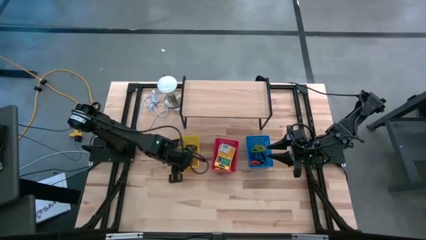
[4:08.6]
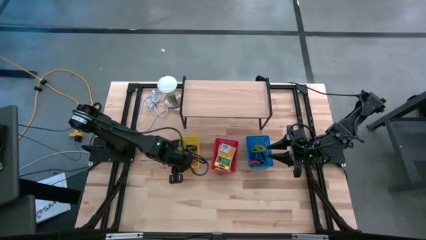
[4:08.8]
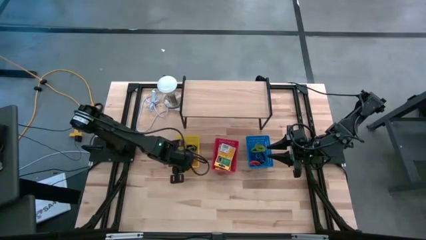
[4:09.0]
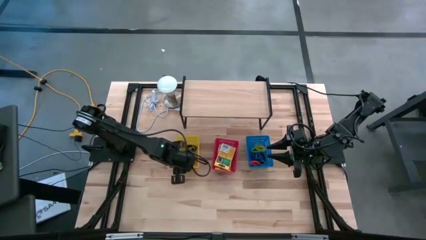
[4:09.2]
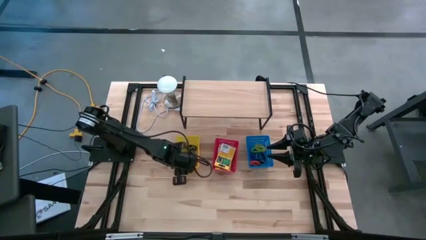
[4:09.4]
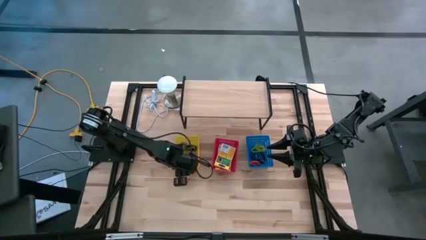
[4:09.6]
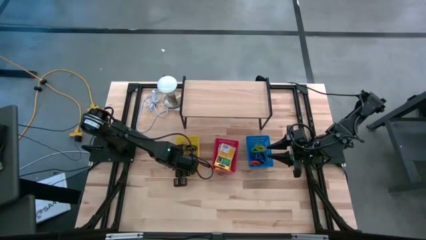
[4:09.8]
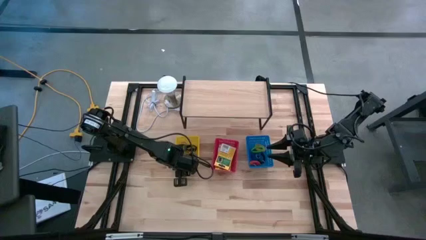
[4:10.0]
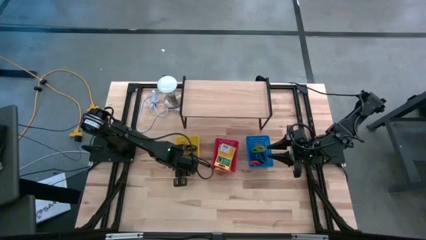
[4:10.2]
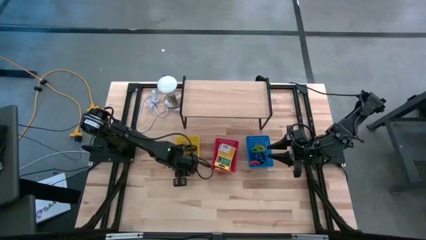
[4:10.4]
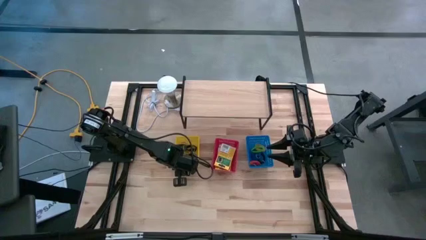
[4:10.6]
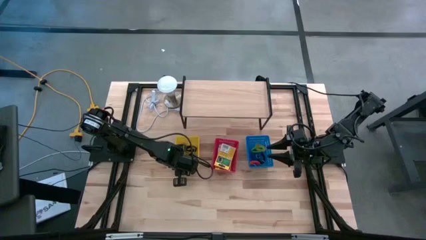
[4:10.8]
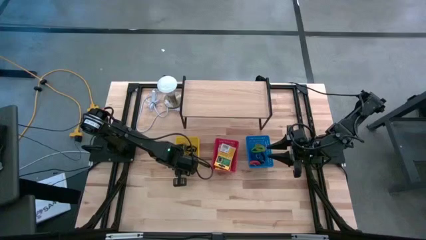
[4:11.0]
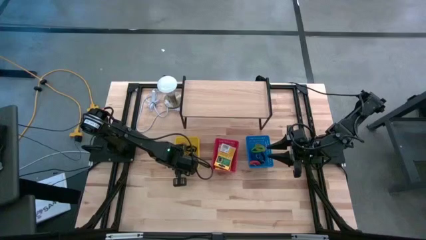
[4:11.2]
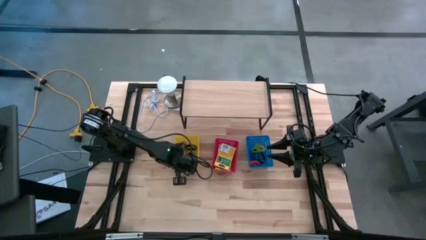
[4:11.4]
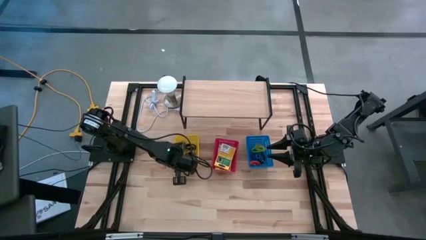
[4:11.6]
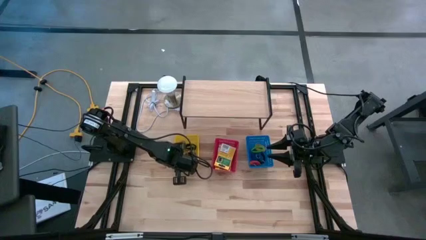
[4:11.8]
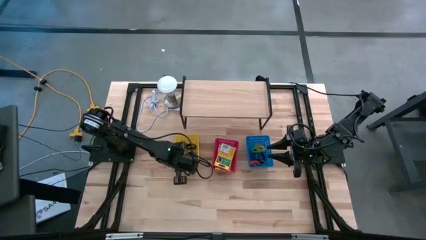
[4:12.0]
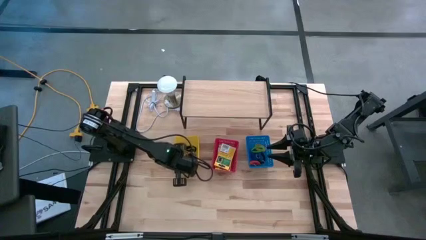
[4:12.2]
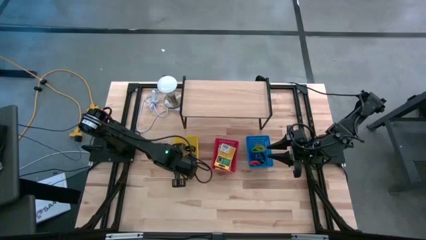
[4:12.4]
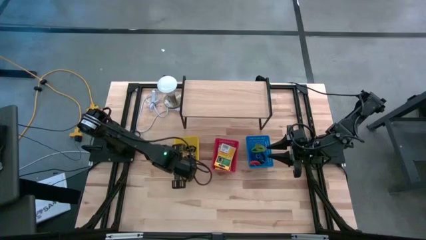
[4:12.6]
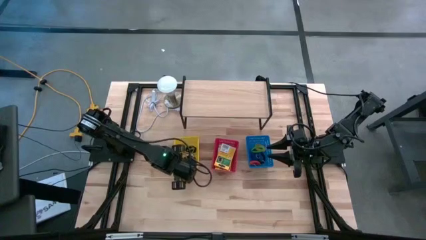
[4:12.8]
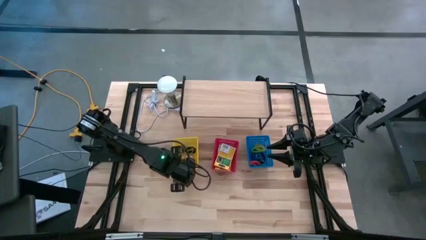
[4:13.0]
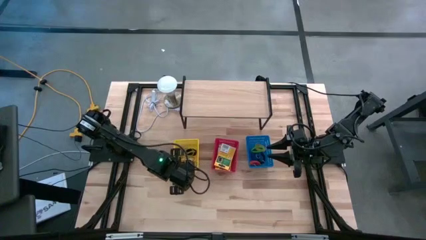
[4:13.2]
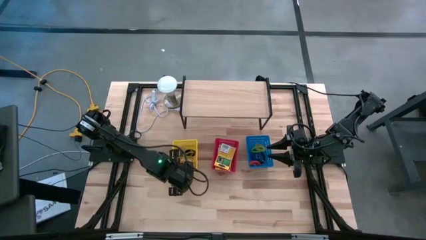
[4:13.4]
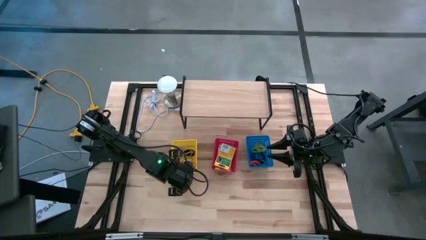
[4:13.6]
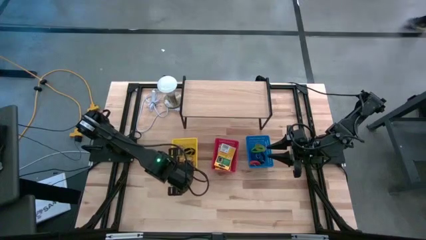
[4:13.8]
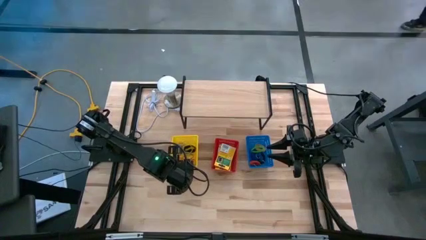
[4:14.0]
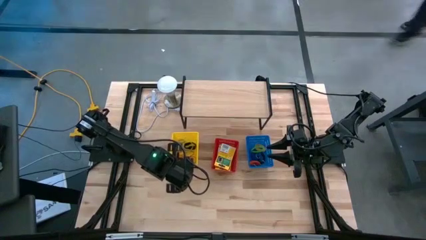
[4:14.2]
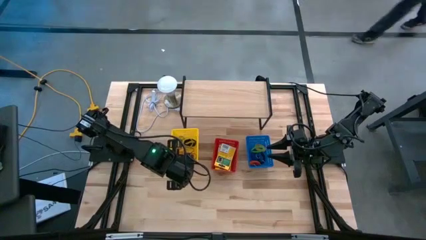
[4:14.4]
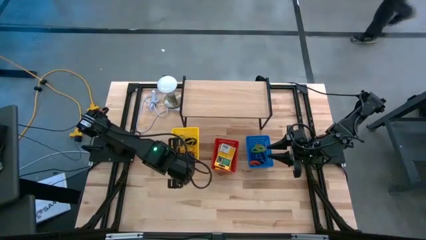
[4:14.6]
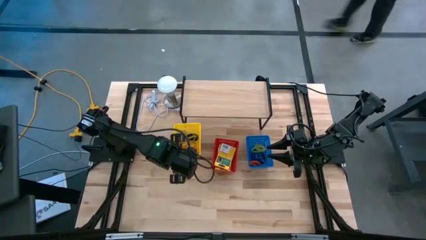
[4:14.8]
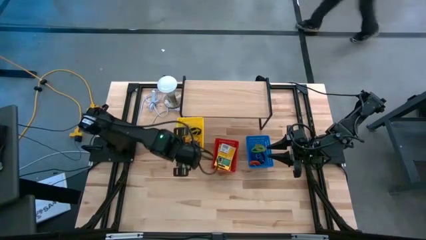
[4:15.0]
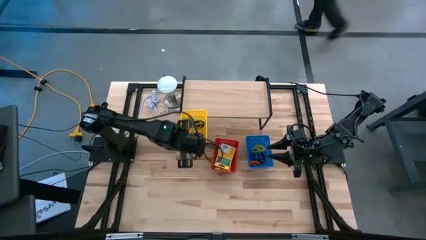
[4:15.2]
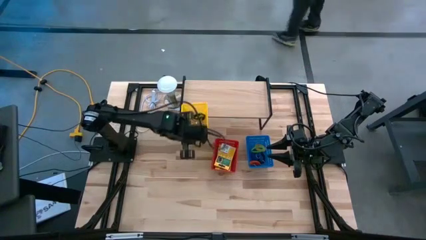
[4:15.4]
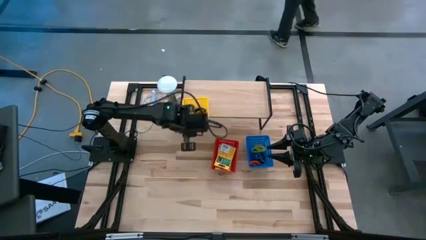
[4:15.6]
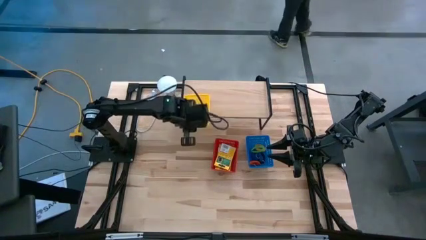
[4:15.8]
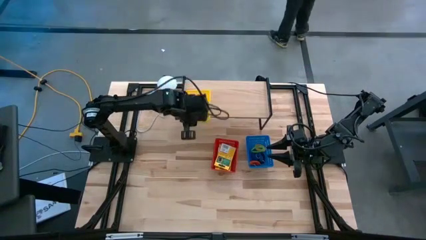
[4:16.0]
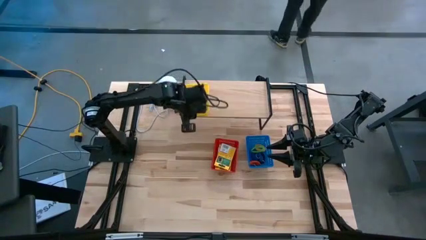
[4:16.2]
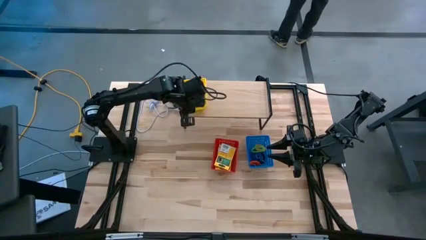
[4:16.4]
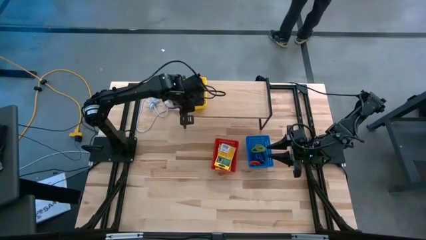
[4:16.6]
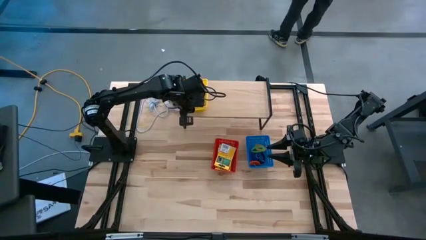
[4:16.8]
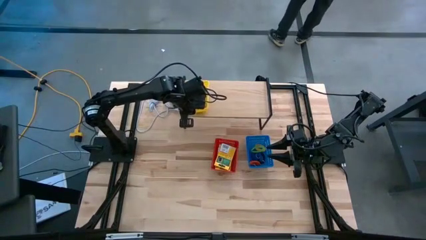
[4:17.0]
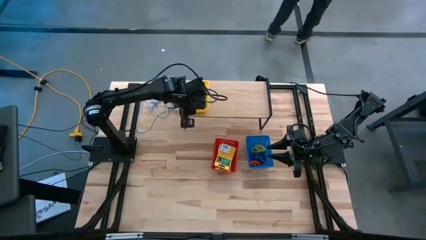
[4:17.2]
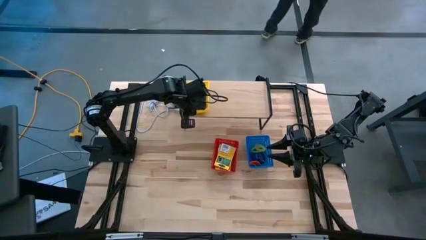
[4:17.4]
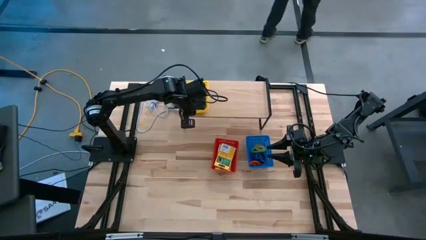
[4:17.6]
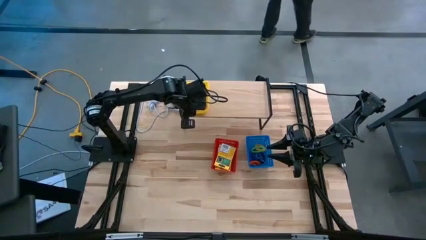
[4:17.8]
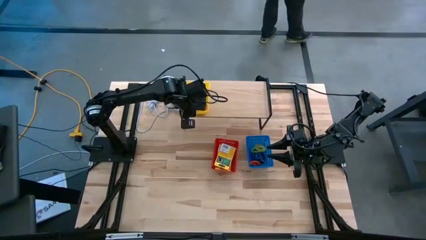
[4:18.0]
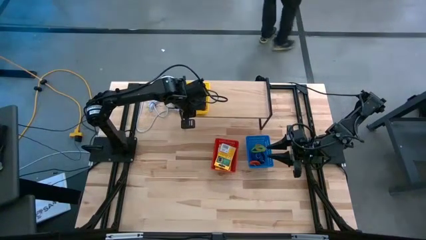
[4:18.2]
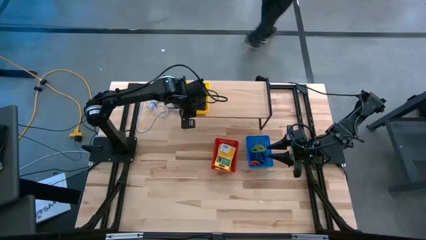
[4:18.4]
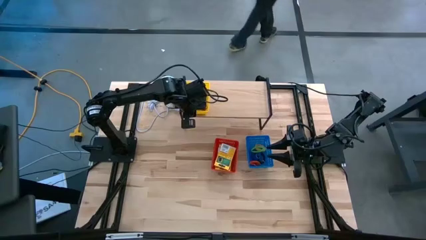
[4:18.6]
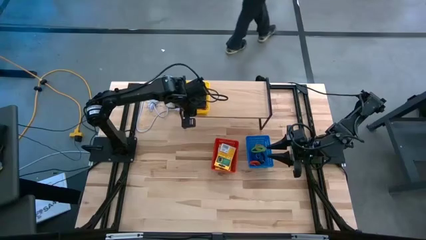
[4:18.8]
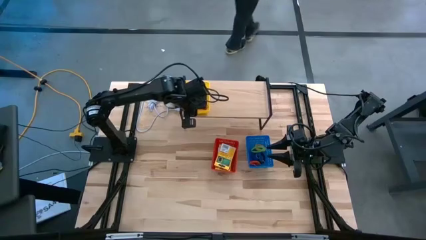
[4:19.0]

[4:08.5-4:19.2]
Task: Pick & Place Office Desk Supplies
Put the yellow bin with the rubber bands on the shelf
